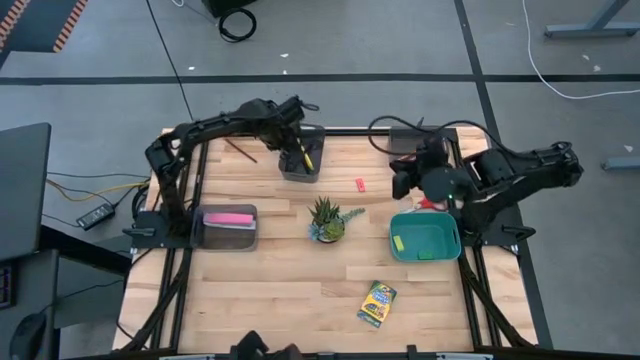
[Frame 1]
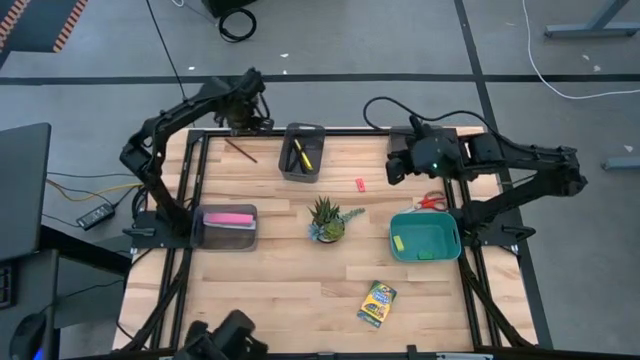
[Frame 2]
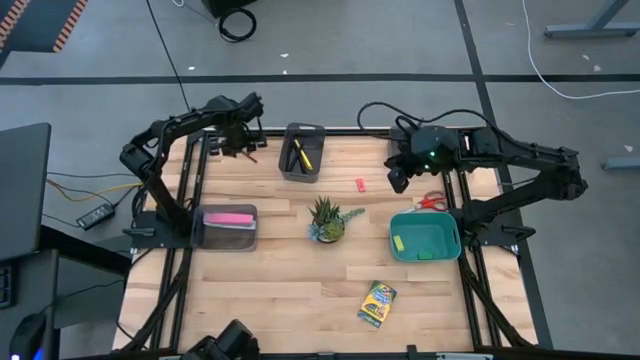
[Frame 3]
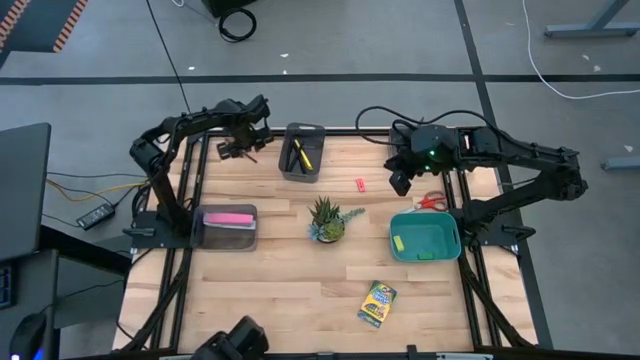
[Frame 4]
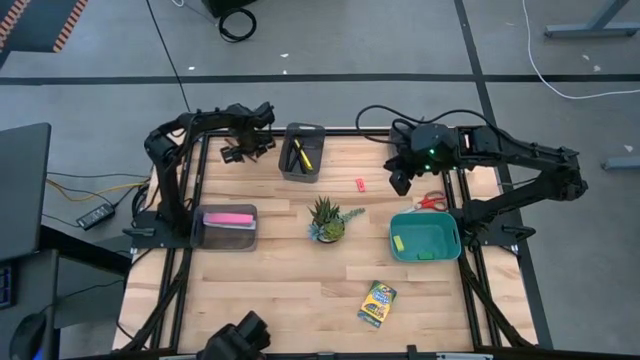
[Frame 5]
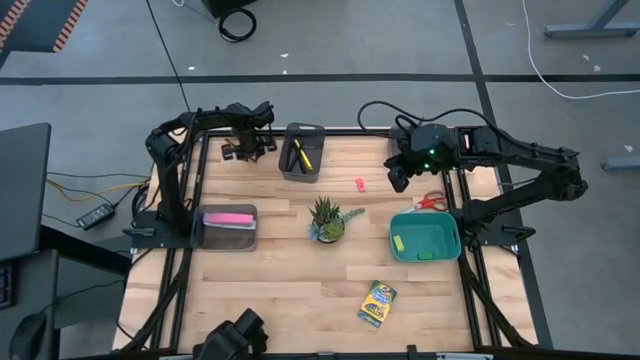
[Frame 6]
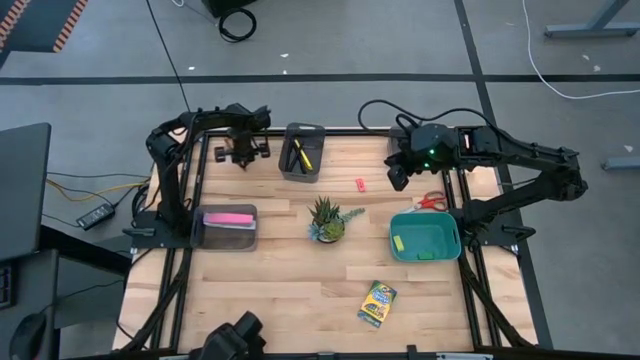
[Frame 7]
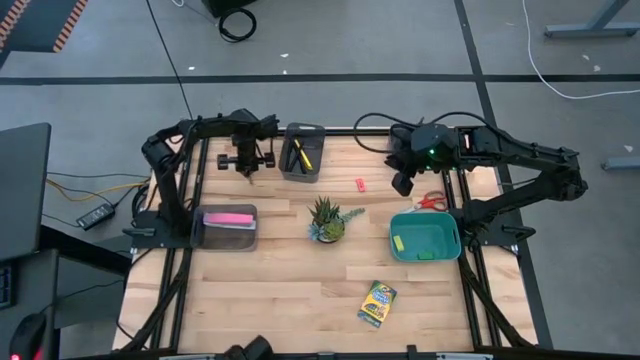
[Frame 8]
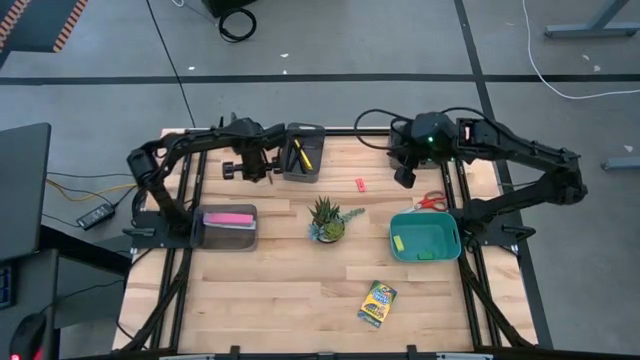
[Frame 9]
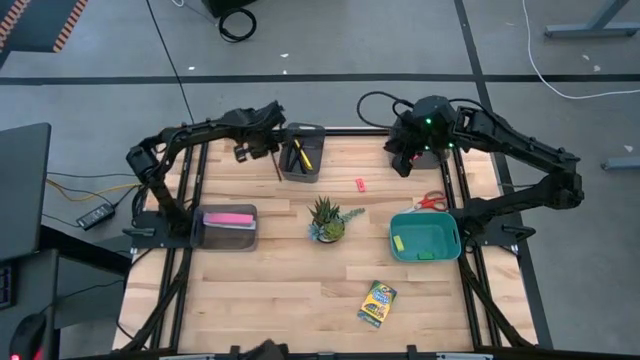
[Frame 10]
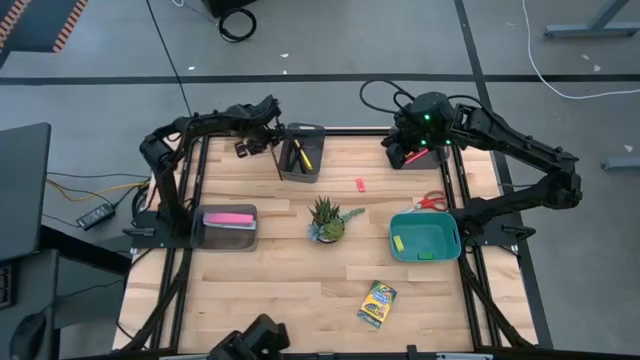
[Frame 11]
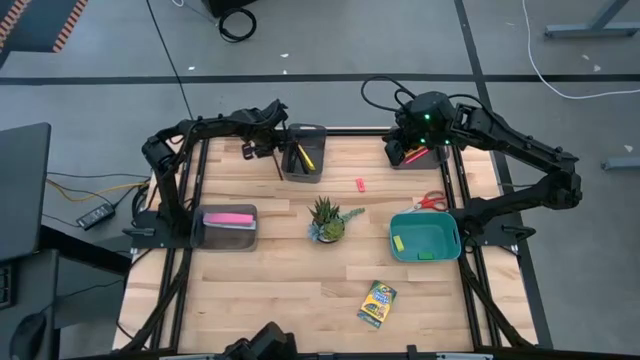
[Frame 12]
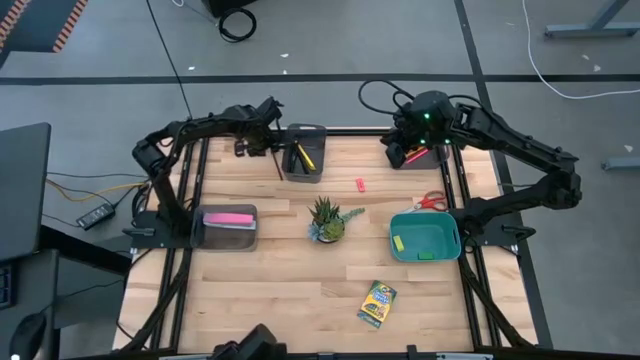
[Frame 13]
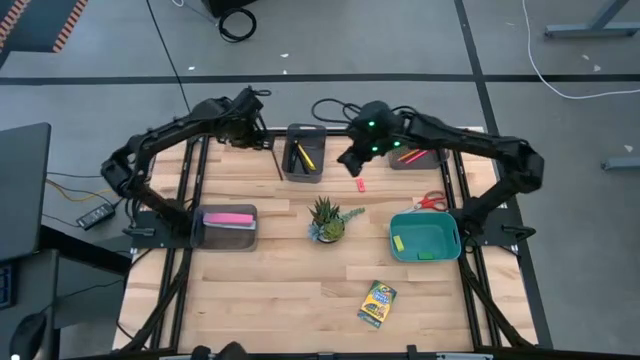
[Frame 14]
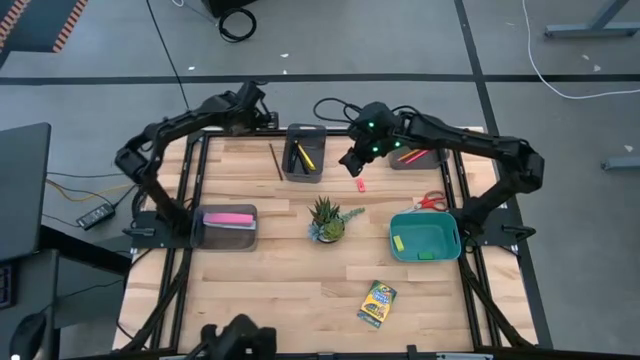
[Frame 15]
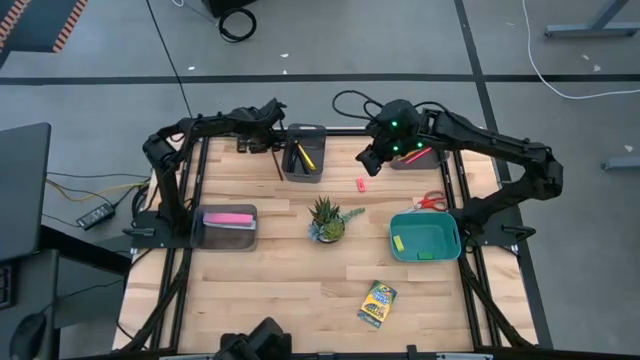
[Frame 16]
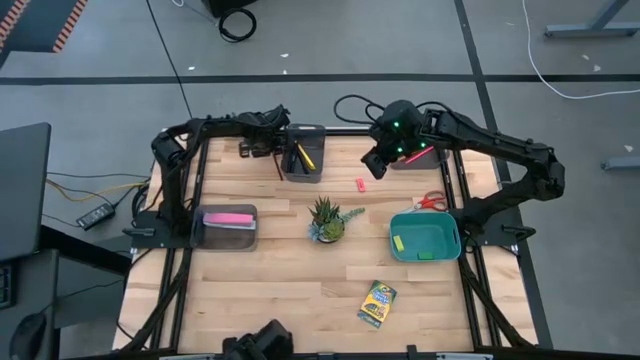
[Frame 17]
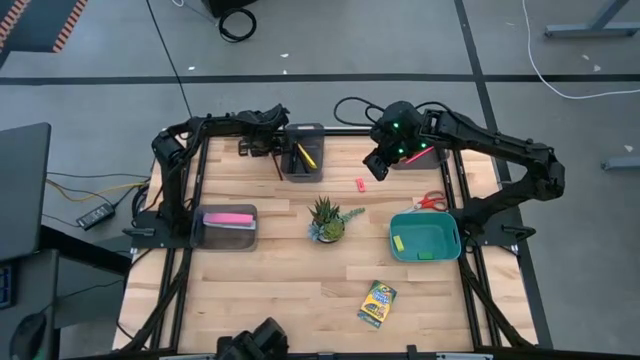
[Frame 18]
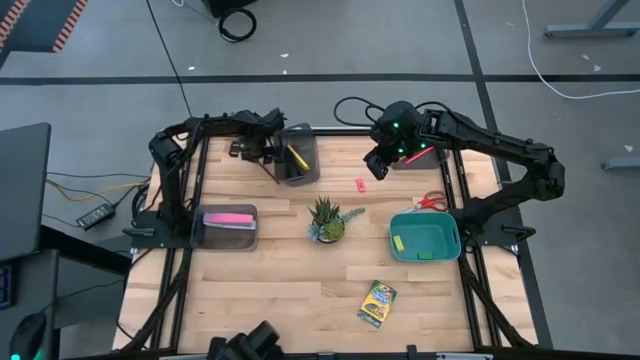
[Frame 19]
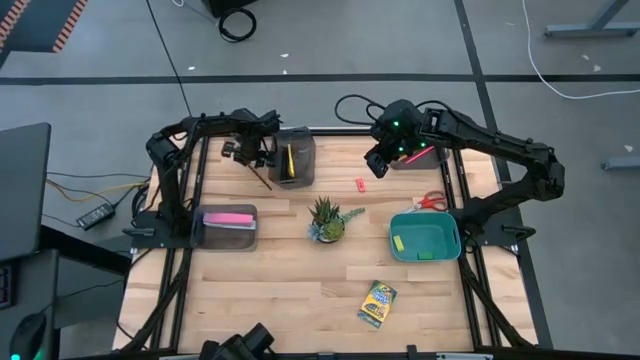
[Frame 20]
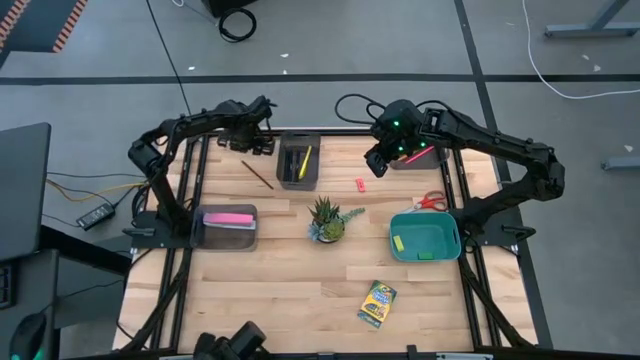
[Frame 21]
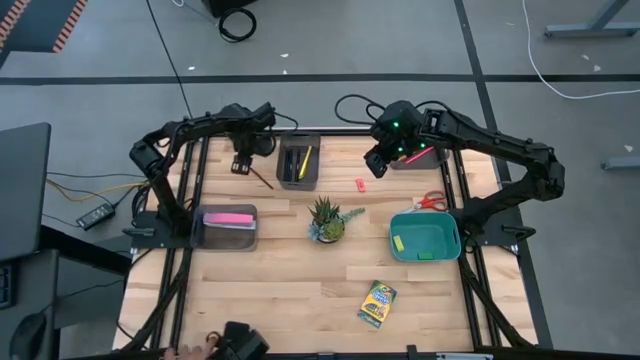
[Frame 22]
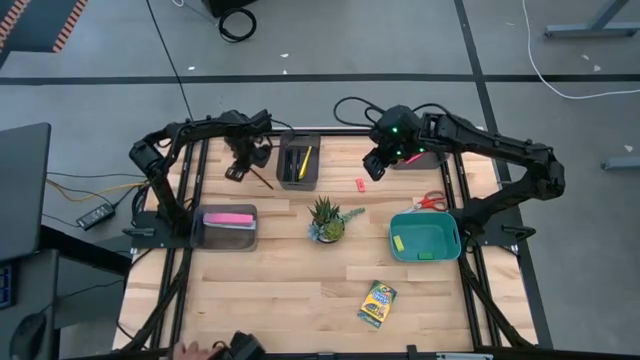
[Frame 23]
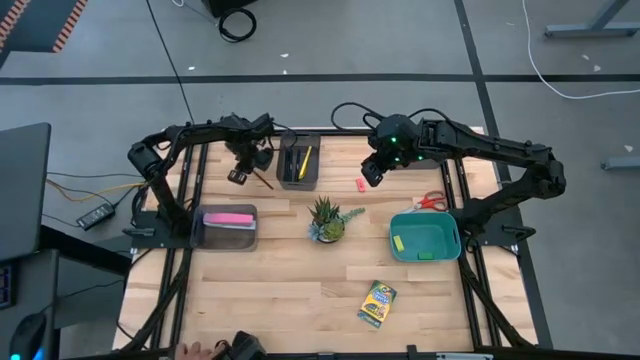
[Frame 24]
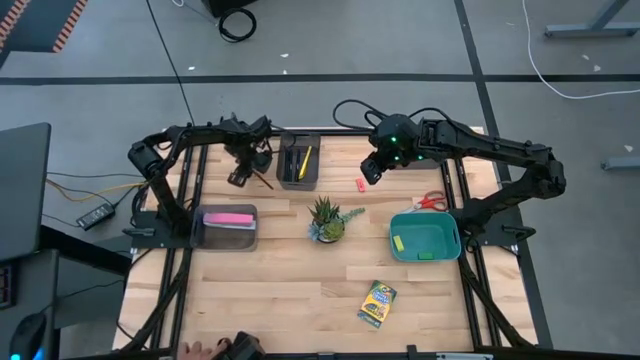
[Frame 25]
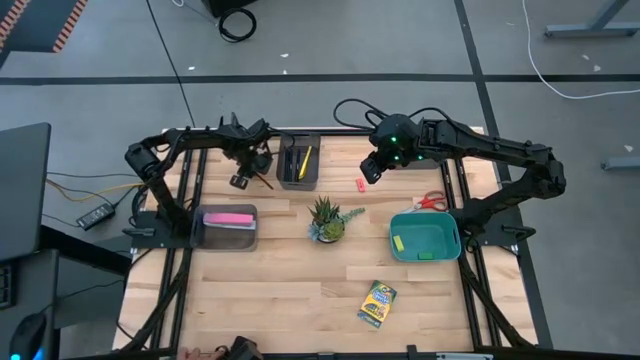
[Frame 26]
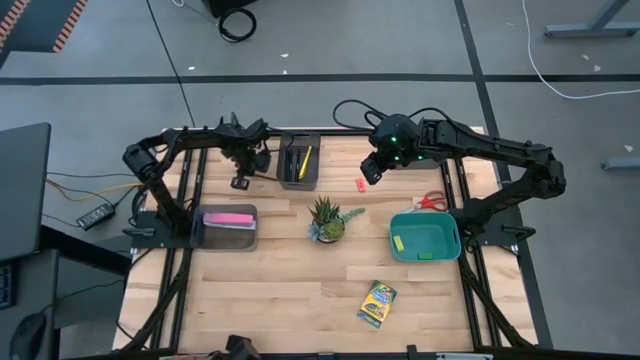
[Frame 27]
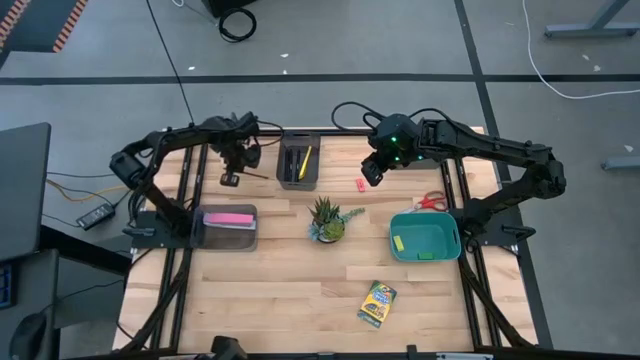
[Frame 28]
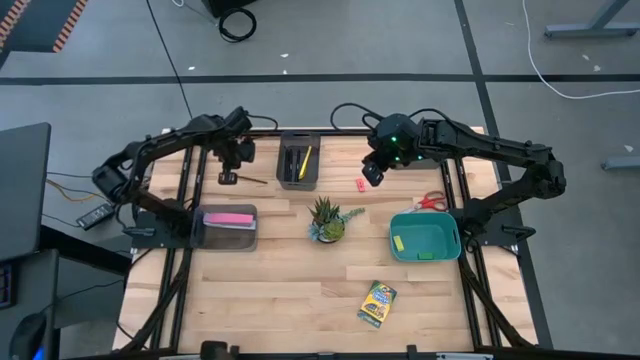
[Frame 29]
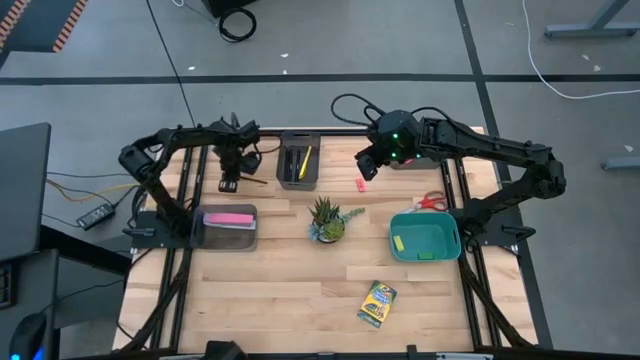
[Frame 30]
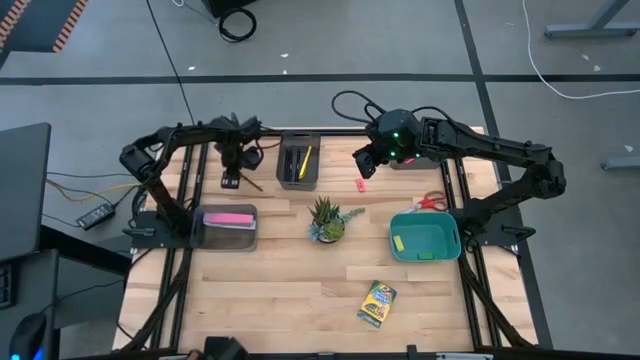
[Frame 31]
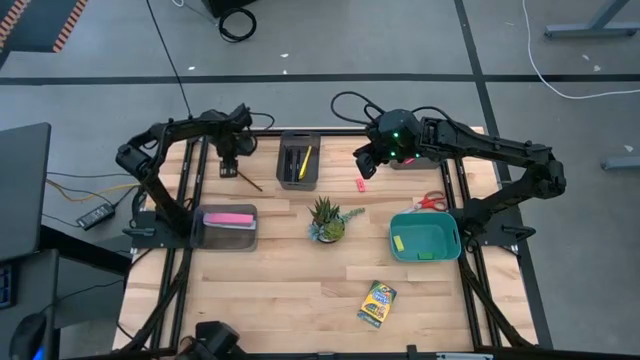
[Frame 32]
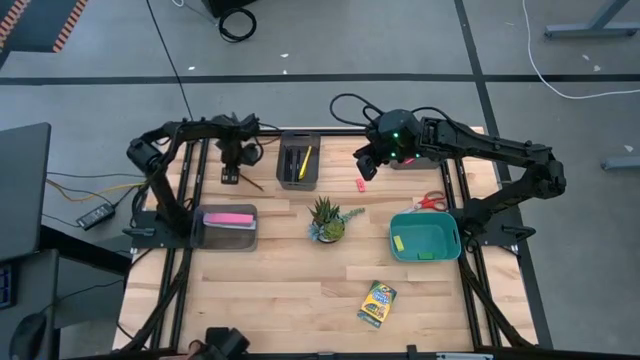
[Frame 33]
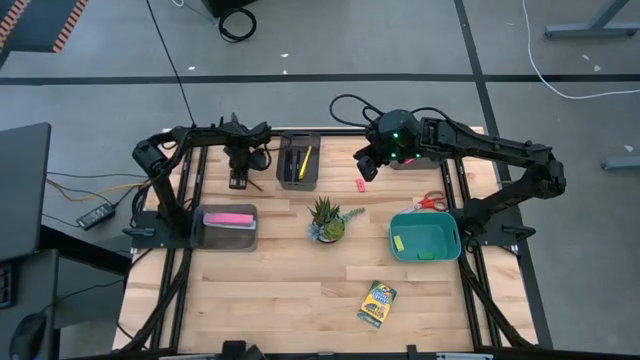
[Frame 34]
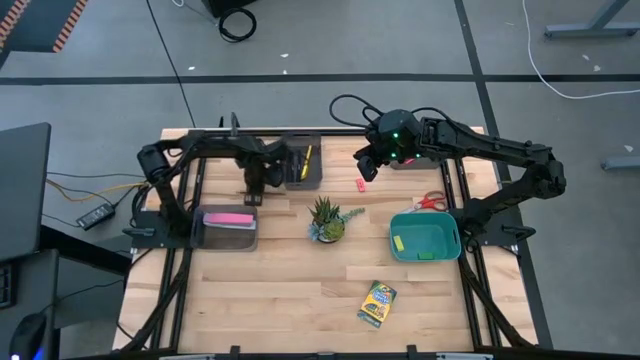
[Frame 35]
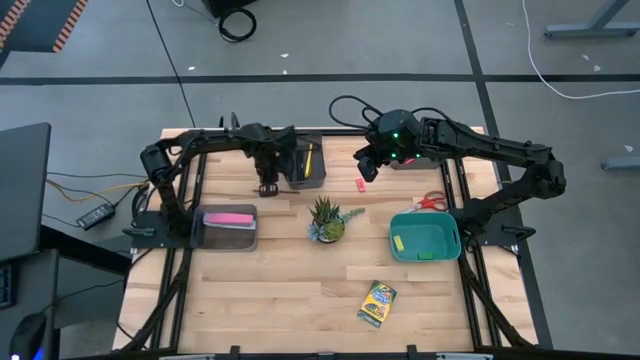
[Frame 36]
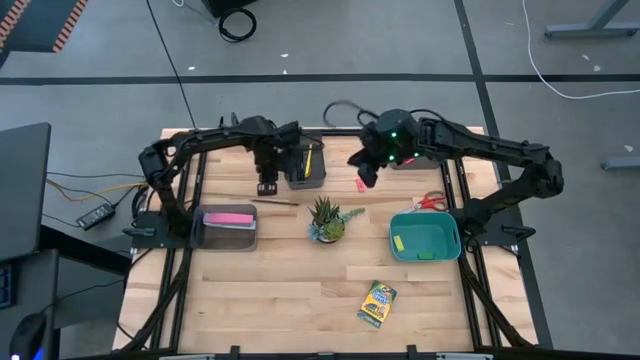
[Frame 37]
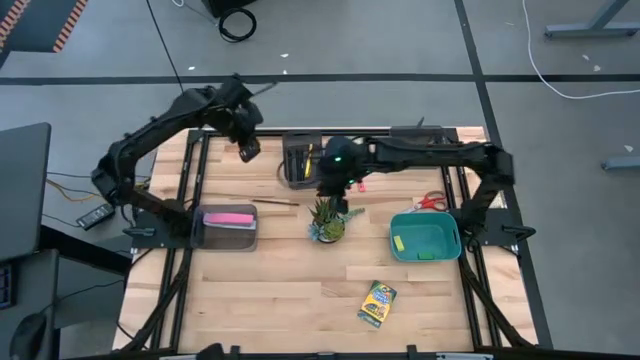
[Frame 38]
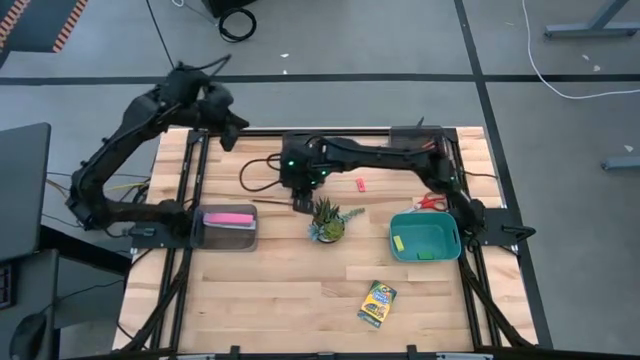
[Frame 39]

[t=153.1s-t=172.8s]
Task: Sort crayons/erasers/pens/pencils in bins
Put the brown pencil into the right black bin

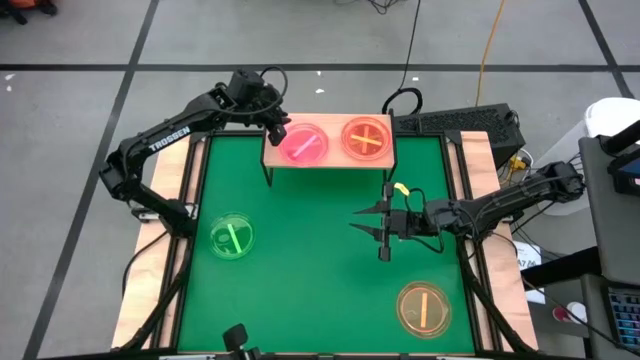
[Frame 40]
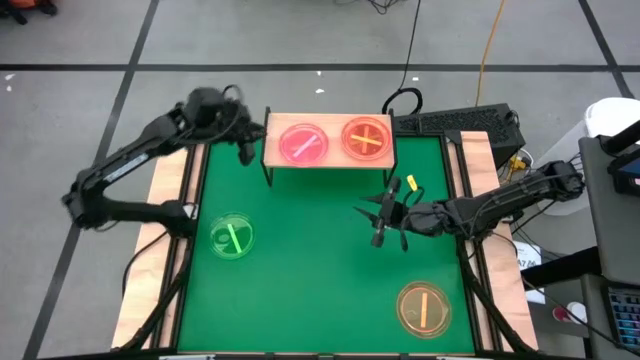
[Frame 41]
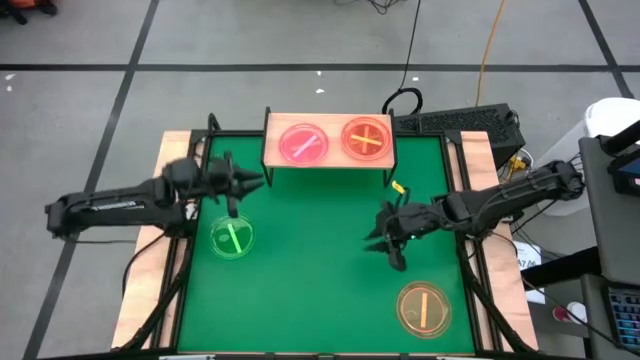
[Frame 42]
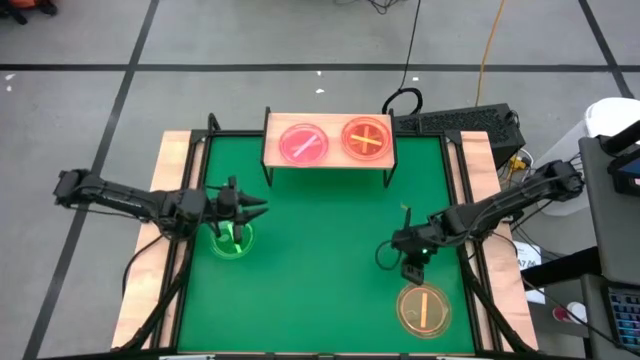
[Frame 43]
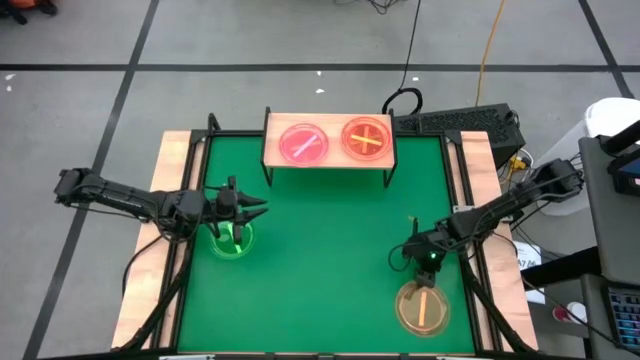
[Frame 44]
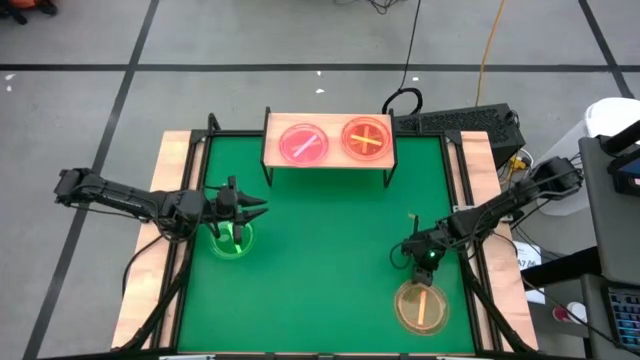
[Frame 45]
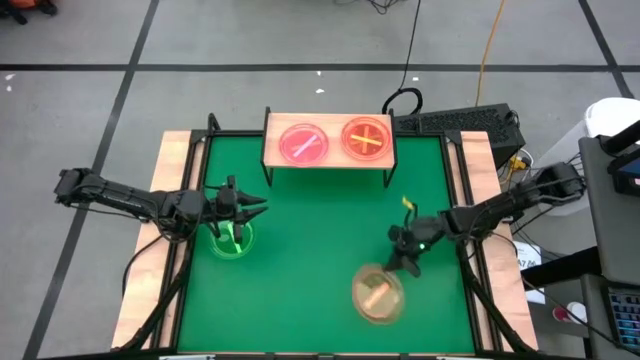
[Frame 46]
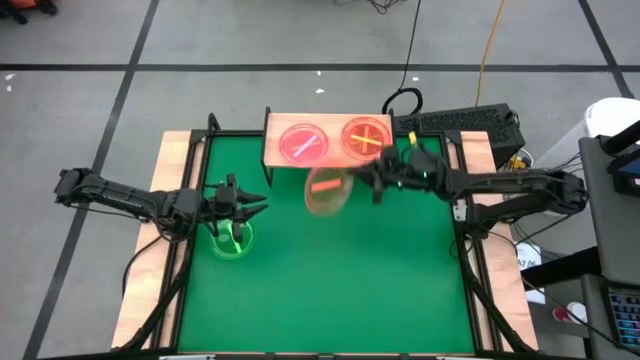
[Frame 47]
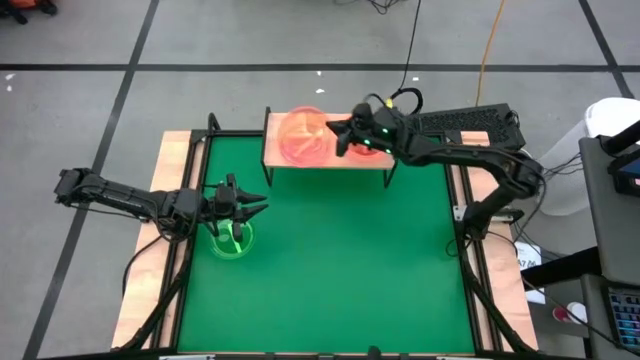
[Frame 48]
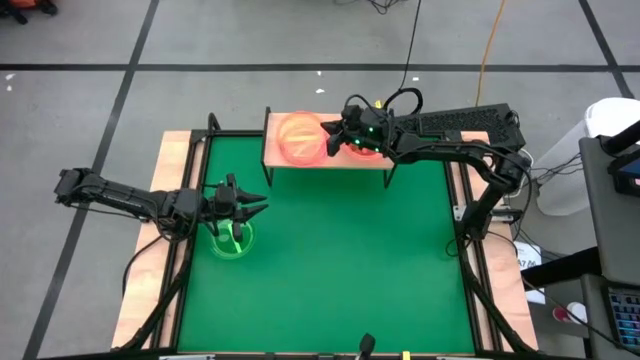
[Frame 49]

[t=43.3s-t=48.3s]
Task: Place and stack plates onto a shelf
Stack the orange plate on top of the pink plate on the shelf
